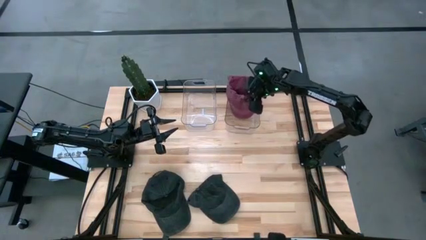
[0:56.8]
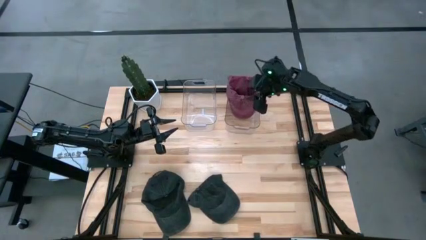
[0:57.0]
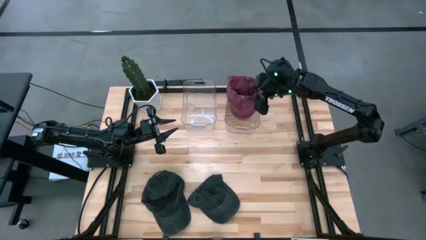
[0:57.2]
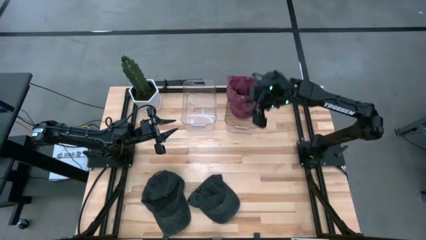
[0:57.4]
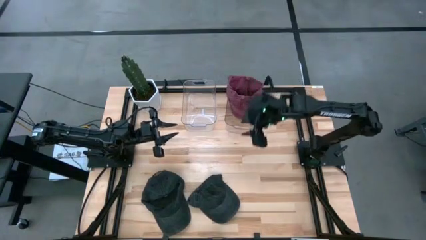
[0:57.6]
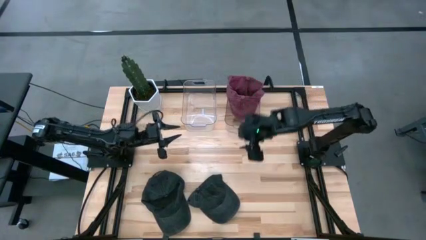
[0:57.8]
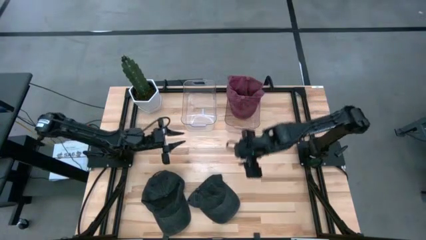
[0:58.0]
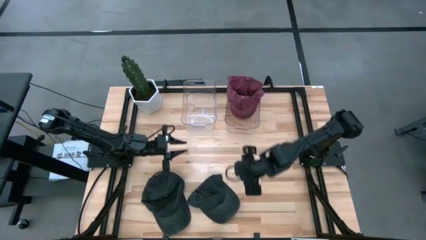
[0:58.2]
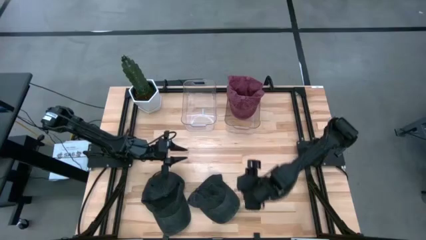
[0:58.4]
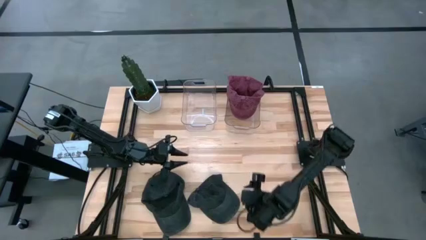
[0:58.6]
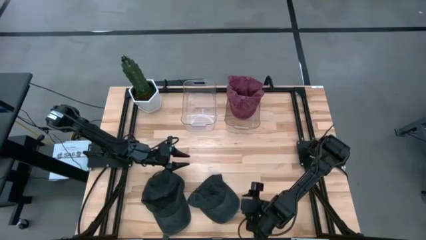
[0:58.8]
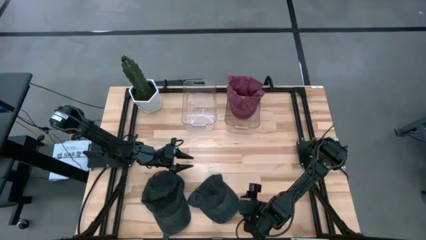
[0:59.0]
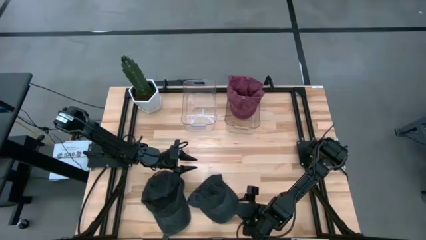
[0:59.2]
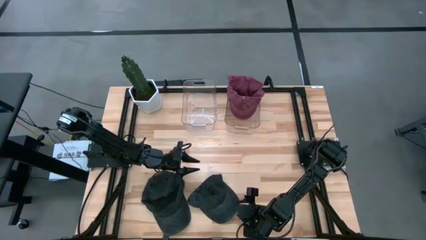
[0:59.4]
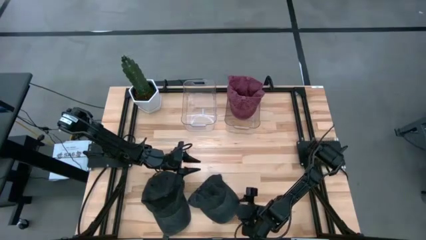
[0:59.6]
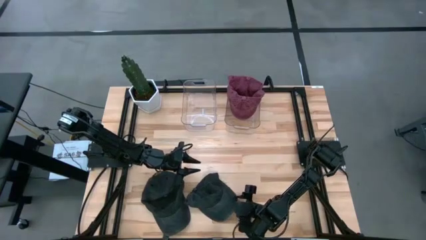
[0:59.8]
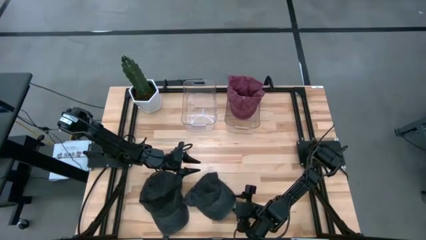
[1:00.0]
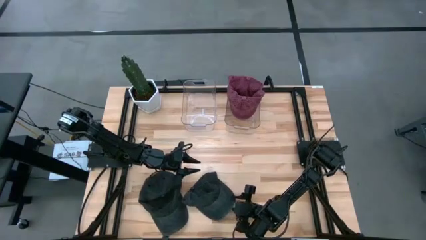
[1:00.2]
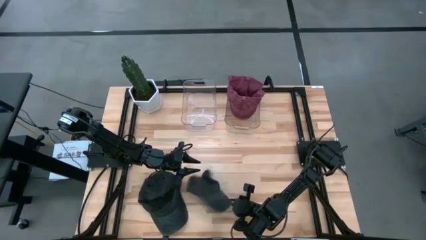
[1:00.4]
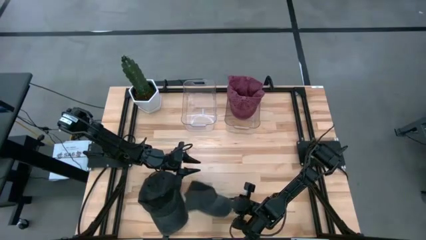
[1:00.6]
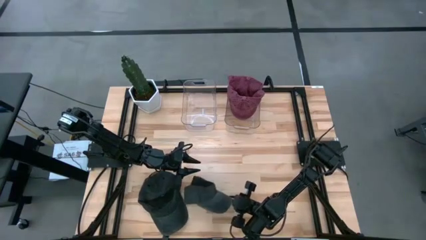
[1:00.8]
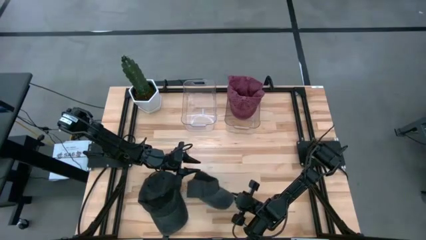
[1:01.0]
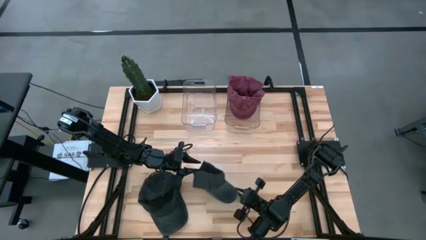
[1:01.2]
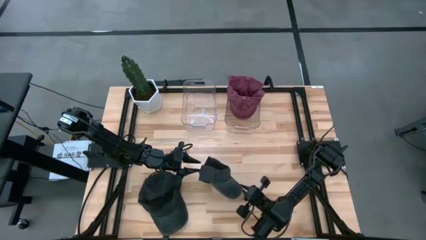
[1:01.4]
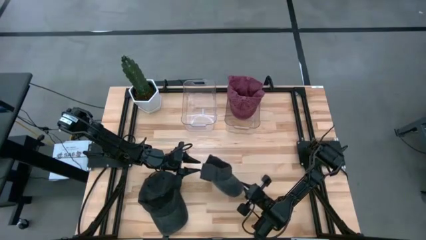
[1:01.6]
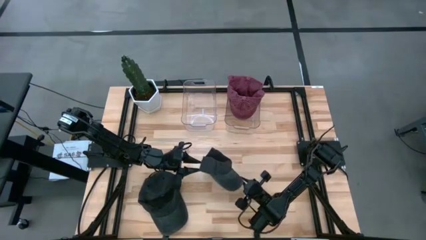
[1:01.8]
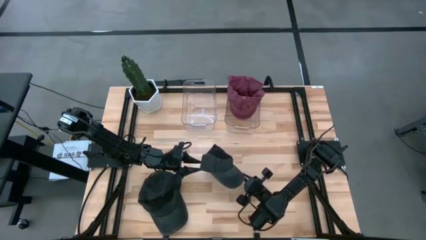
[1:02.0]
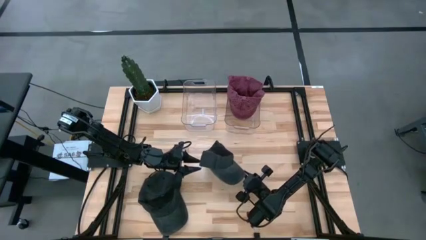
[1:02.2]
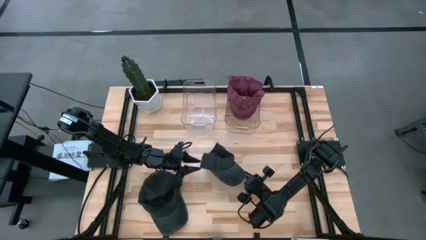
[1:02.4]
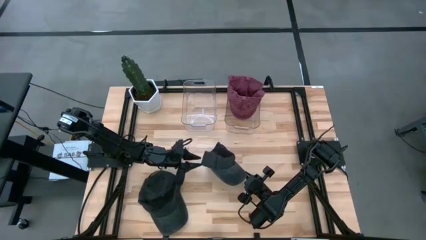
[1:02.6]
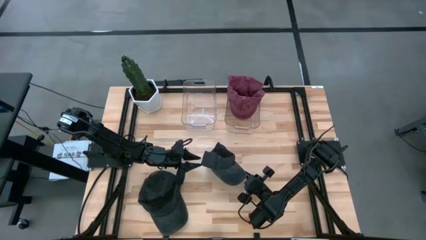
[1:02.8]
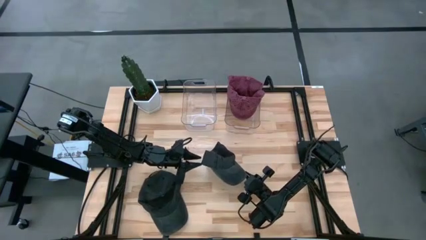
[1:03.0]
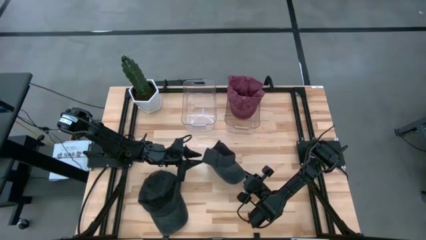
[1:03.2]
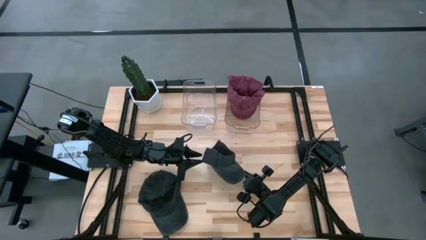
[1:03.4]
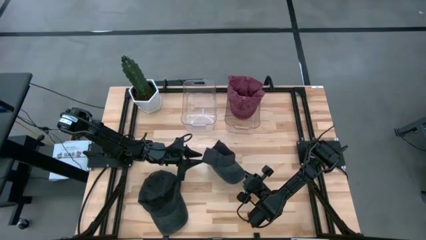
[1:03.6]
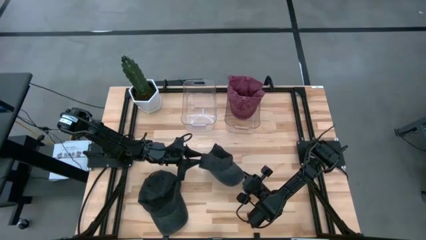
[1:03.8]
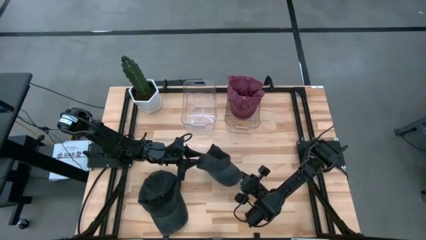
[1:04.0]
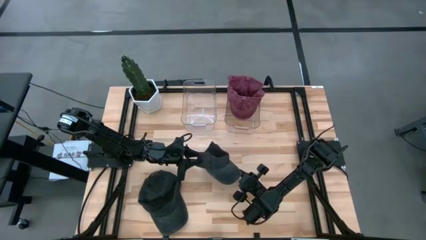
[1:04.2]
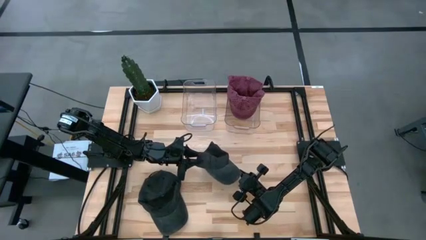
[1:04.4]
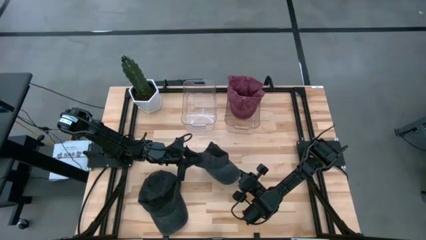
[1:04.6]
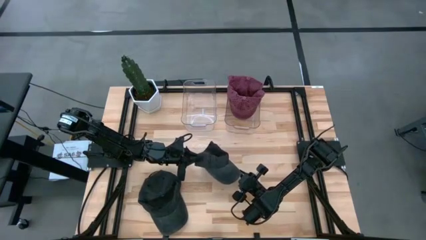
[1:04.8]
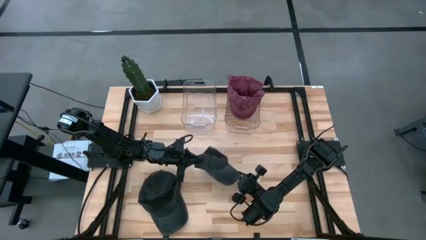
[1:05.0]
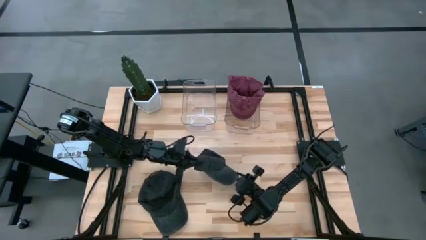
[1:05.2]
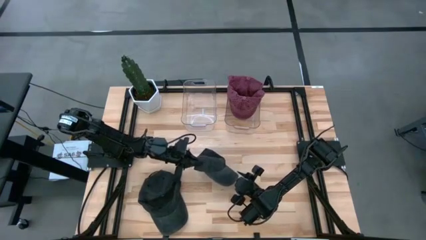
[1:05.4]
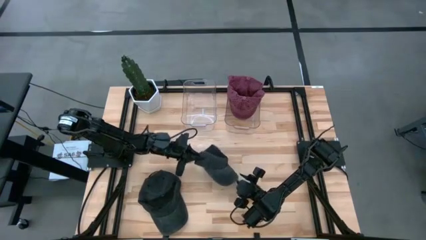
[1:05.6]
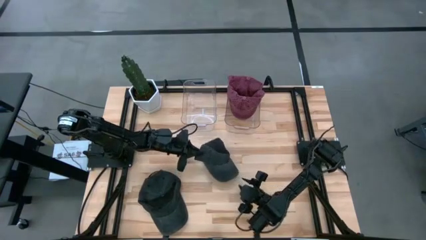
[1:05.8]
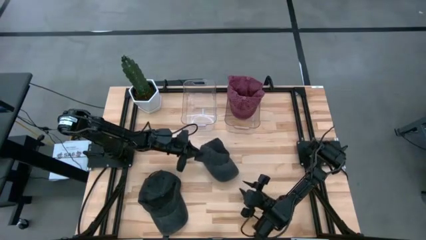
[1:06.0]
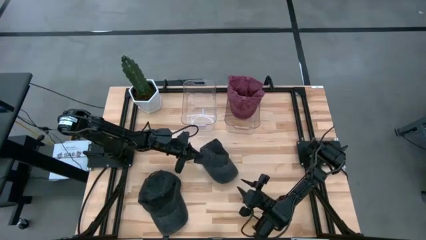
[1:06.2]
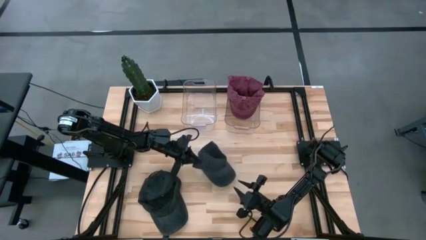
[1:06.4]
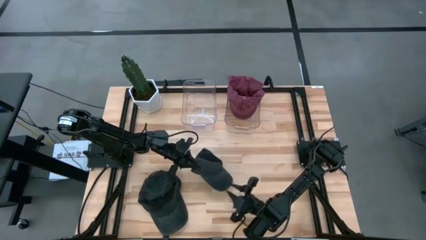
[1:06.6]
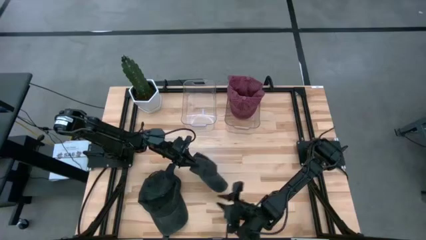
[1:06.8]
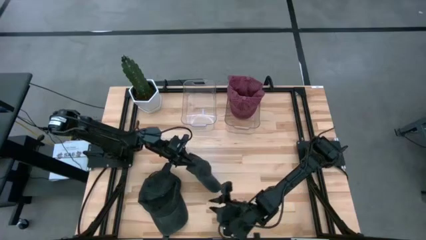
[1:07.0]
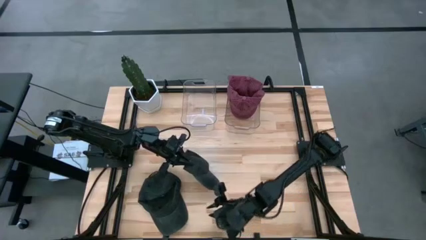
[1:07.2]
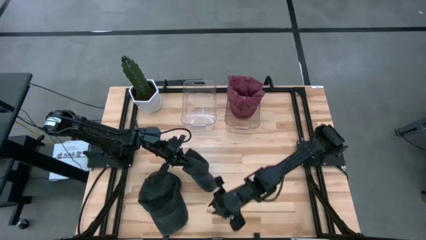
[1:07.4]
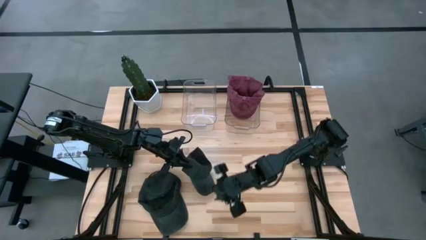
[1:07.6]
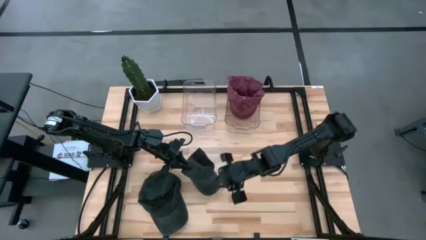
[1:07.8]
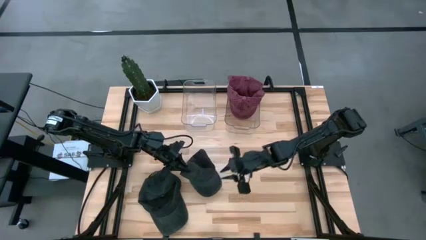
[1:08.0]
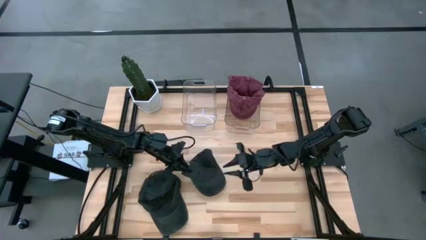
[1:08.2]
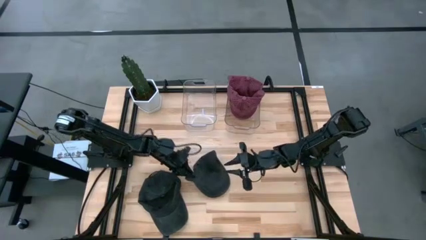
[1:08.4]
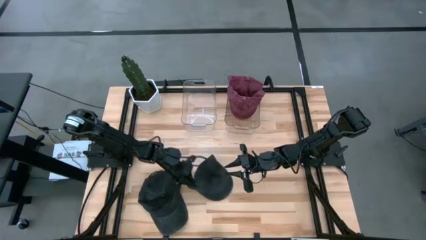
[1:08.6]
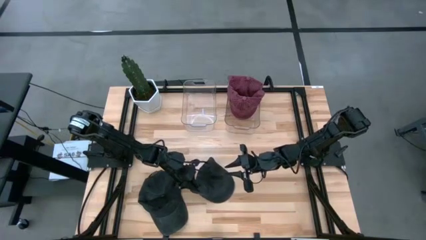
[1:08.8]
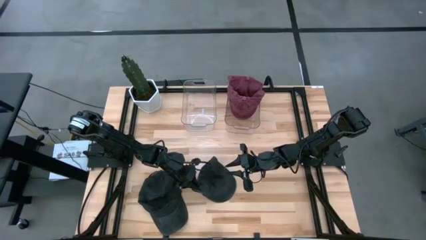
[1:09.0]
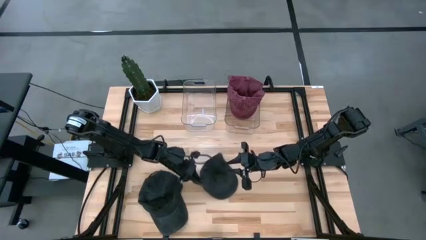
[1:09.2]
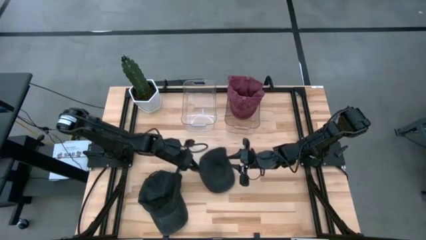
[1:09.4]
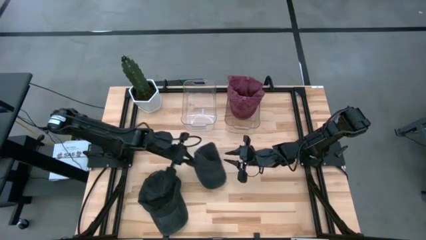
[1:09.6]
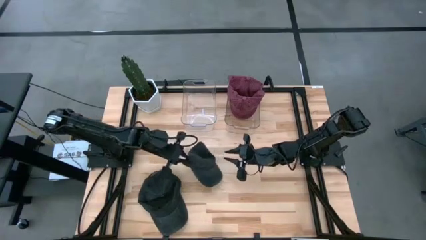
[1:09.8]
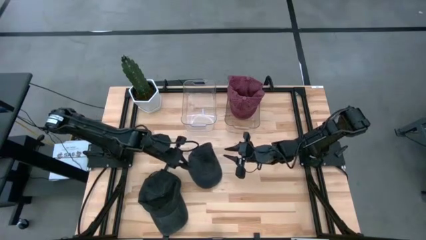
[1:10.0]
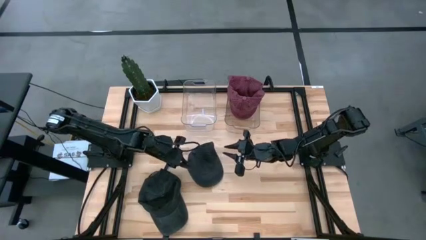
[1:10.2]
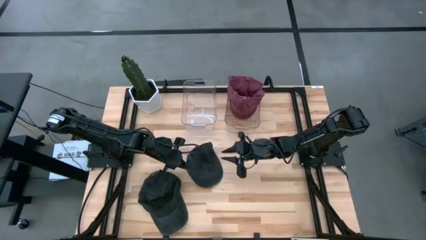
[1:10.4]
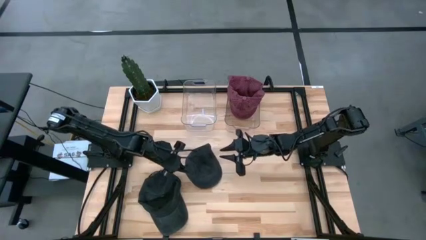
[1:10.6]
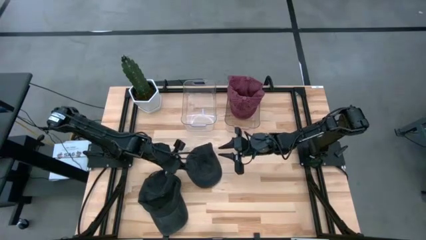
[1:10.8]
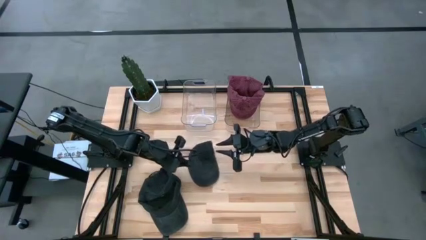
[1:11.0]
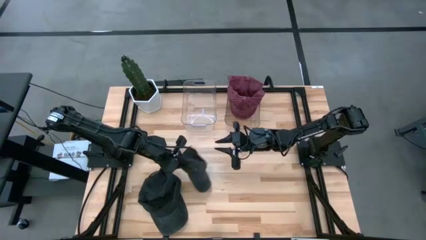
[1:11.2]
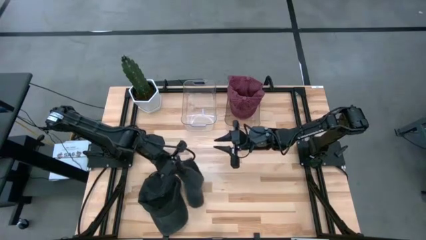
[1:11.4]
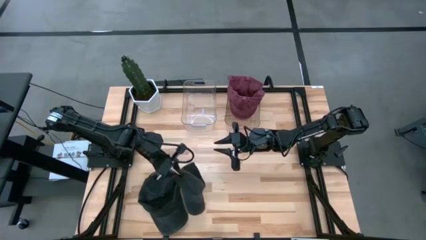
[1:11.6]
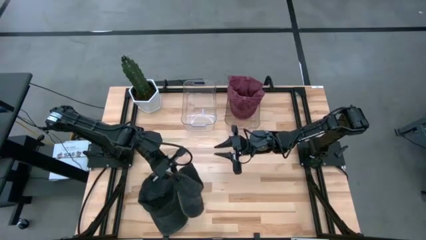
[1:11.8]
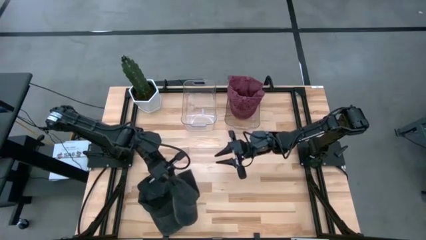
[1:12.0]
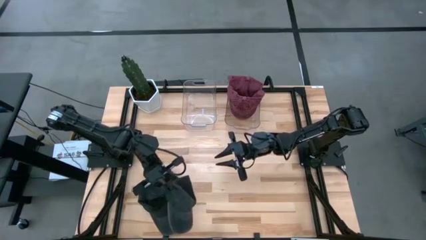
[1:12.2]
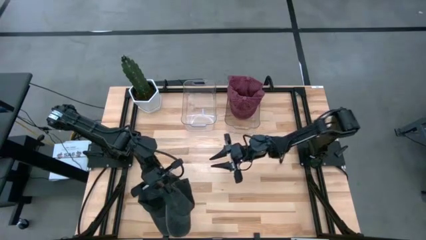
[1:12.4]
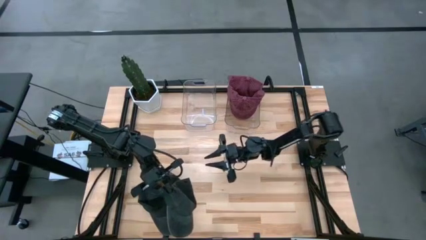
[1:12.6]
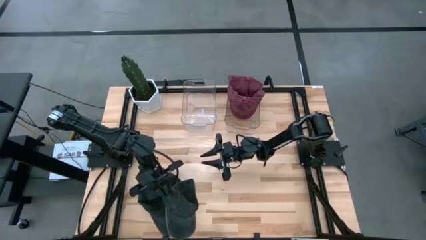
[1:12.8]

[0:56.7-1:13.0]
Task: Pick & Place hat
Put the right black head cap into the left transparent bin
